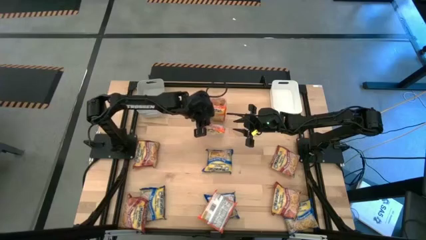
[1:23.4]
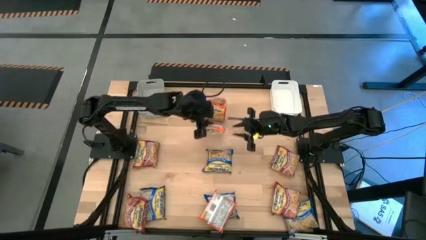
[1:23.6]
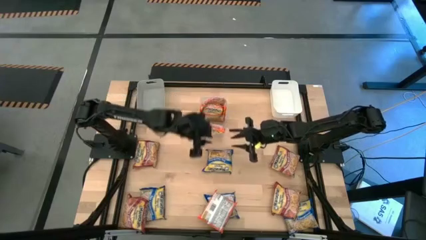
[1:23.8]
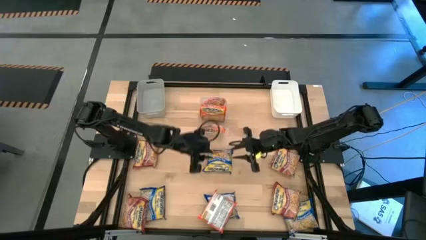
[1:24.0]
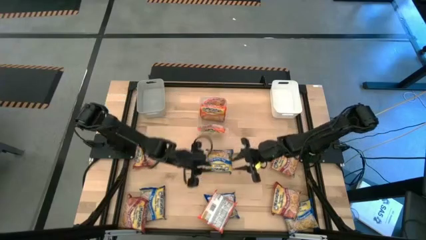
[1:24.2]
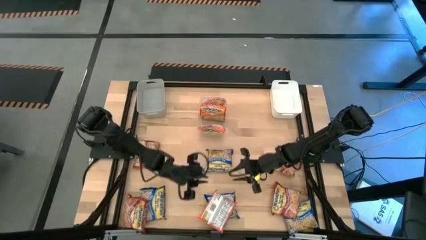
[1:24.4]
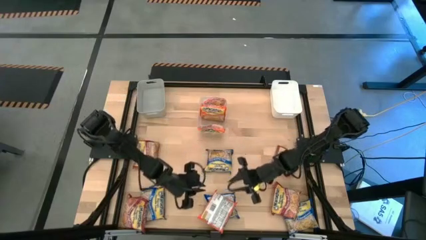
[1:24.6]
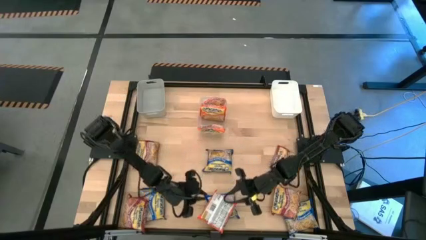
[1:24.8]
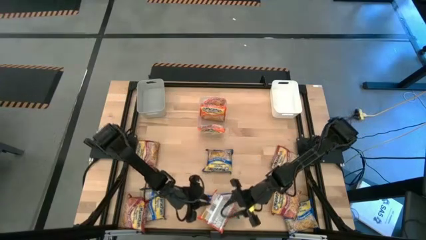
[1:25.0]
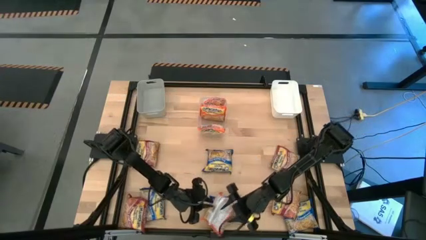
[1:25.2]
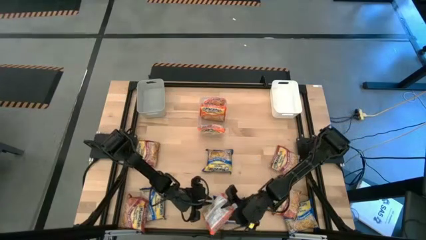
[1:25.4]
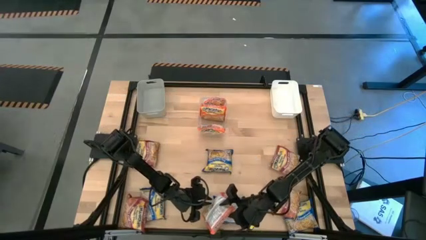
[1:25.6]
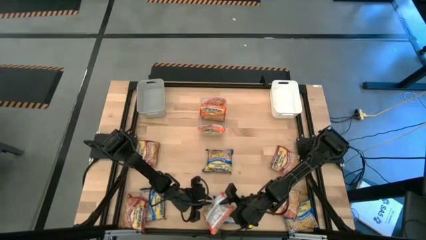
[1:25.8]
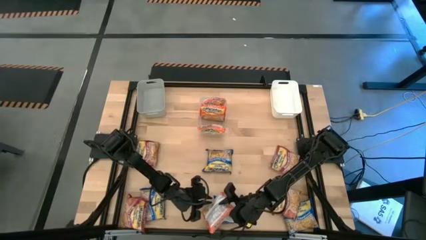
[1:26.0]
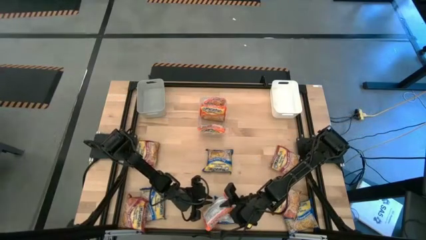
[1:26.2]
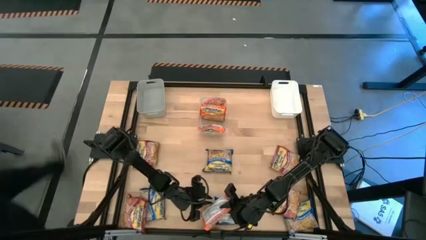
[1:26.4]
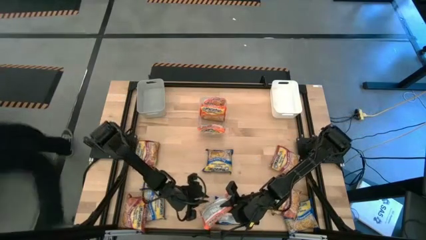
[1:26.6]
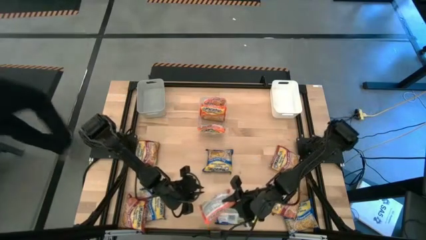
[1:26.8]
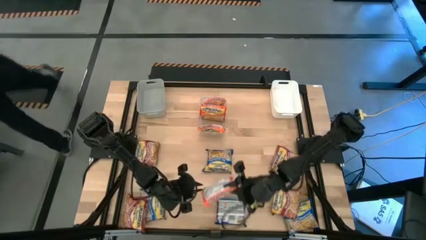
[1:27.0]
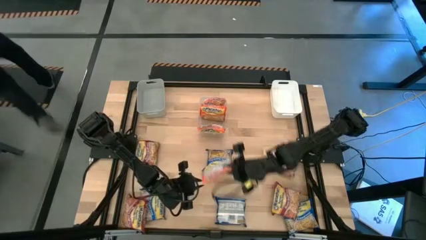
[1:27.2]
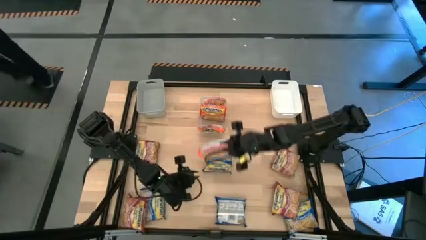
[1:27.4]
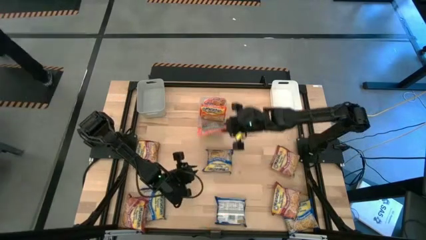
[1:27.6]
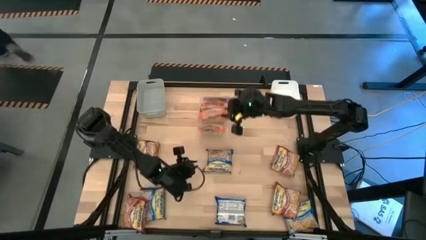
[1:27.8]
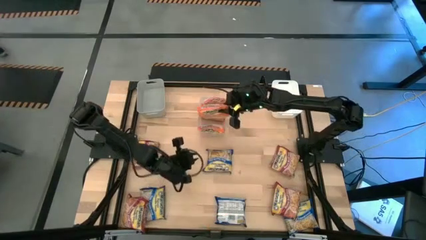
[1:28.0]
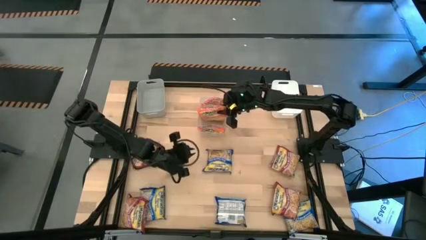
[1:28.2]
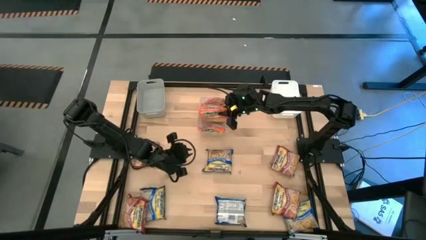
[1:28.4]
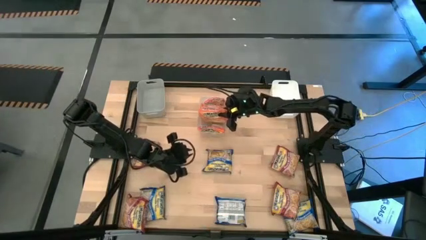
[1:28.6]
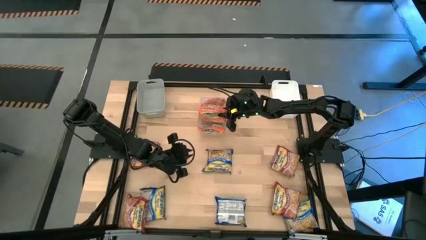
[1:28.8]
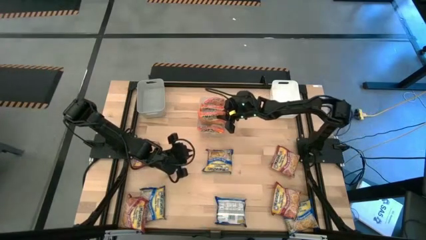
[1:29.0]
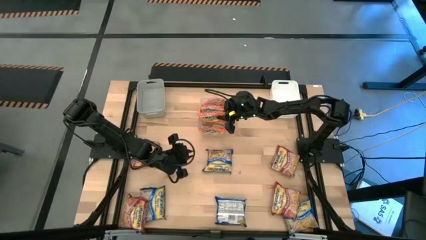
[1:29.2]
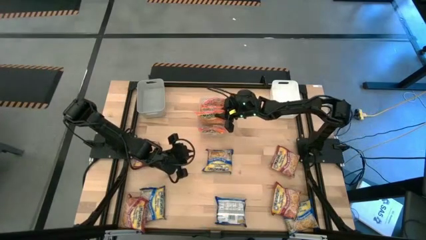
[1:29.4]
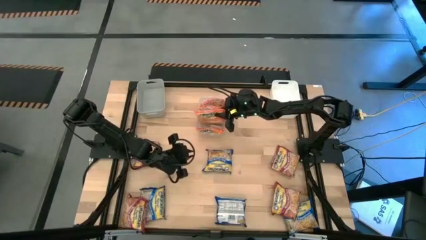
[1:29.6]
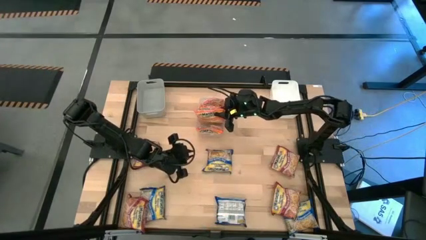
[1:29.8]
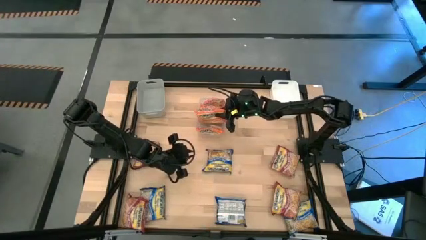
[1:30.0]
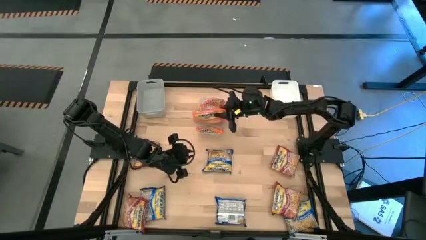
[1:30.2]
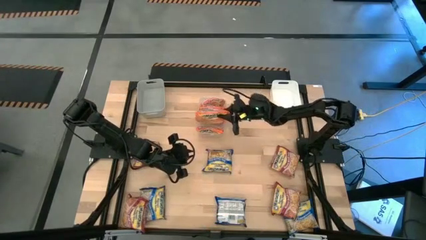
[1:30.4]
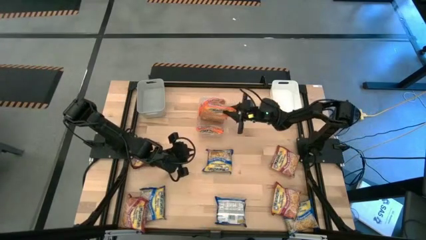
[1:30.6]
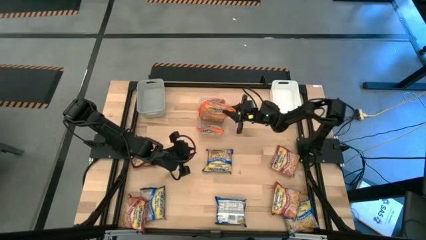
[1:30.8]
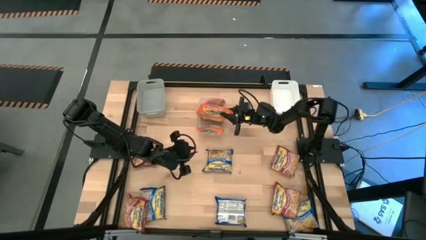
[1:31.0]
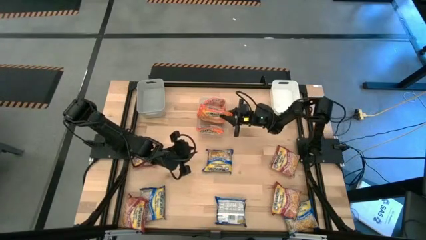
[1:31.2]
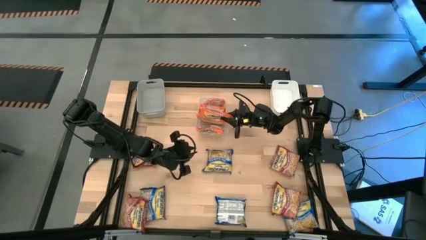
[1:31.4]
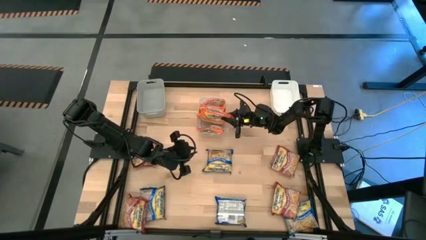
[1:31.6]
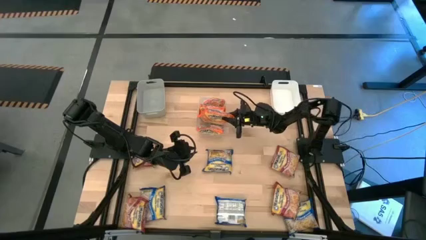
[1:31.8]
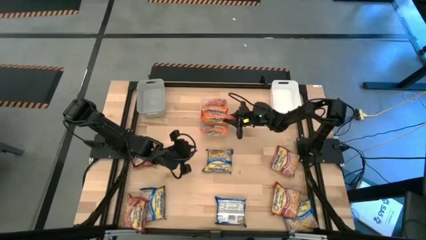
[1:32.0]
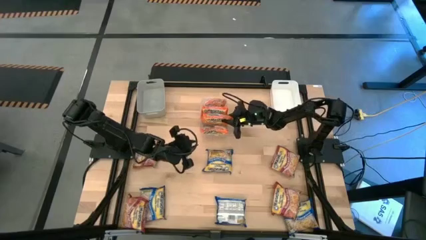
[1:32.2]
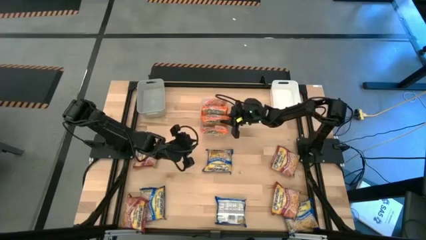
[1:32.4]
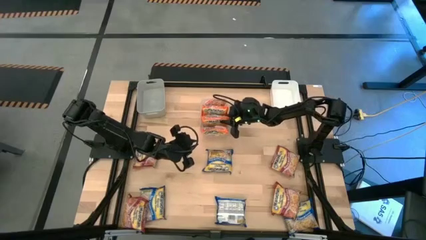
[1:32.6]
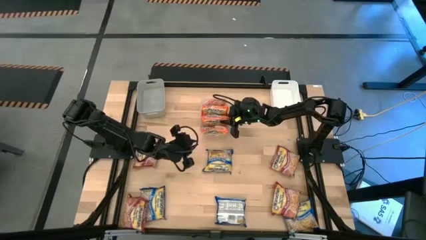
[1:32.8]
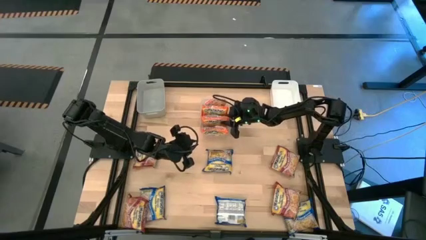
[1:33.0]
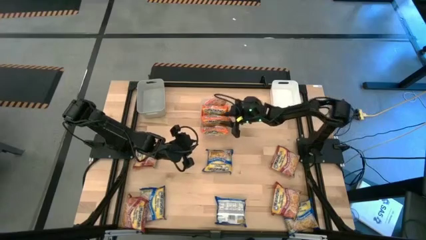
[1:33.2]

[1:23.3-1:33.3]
Task: Sort Maruchan noodles
Put the orange noodle into the transparent bin

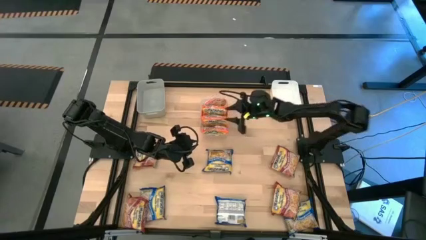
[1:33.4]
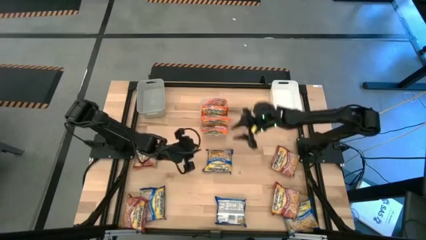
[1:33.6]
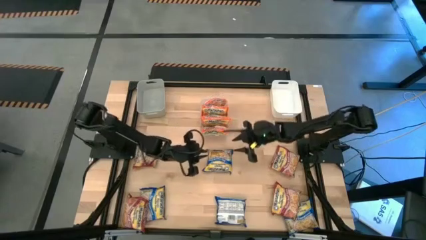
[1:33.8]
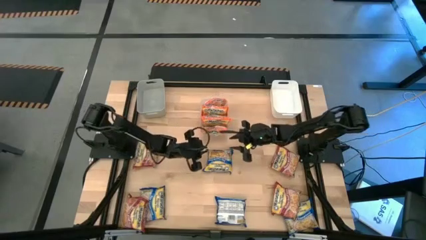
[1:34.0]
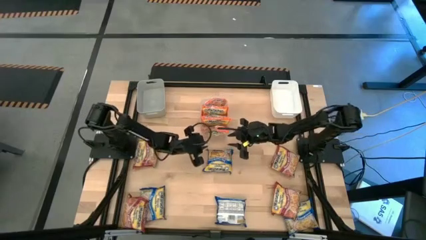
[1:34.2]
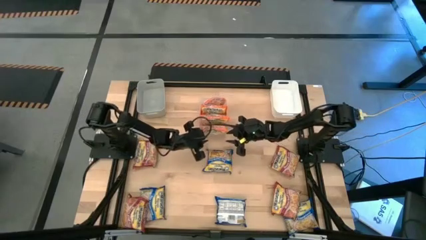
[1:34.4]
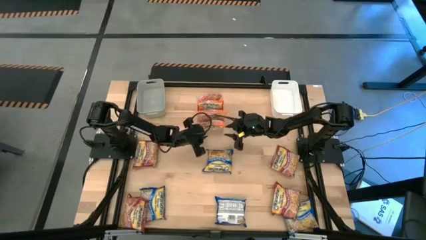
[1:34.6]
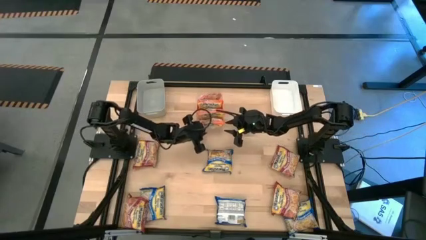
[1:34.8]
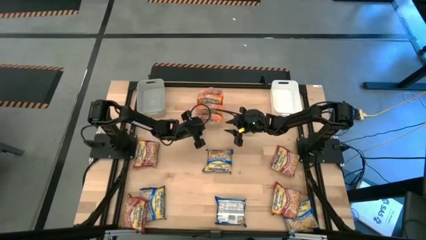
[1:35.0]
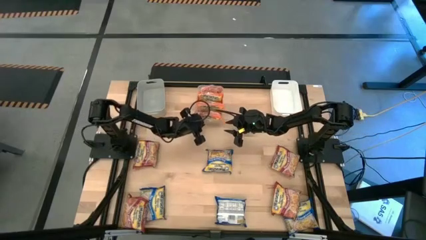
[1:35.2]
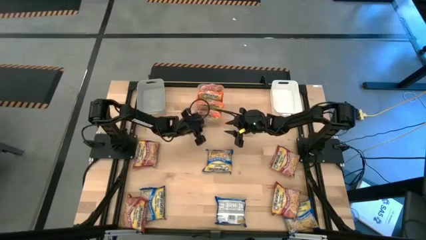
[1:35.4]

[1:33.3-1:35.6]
Adjust the transparent bin on the table

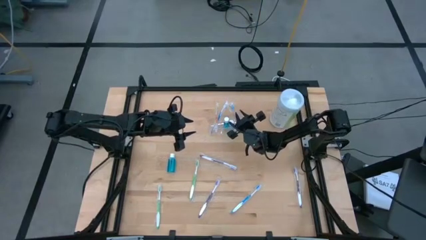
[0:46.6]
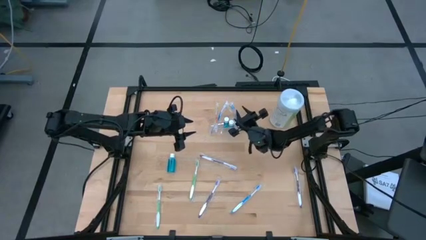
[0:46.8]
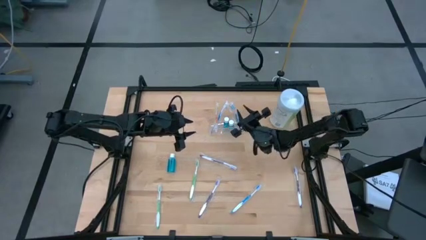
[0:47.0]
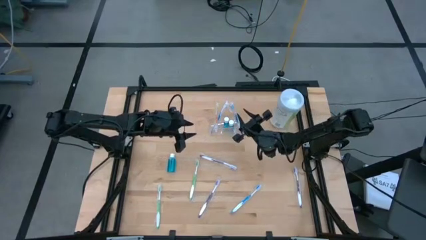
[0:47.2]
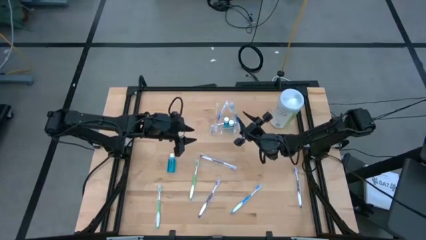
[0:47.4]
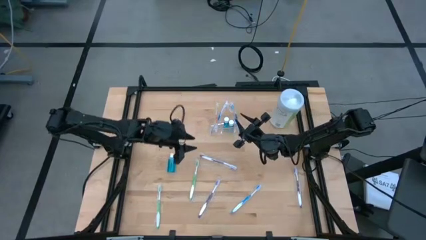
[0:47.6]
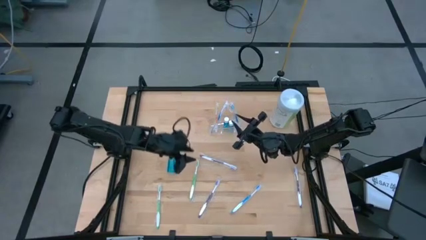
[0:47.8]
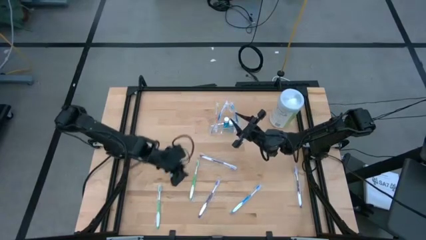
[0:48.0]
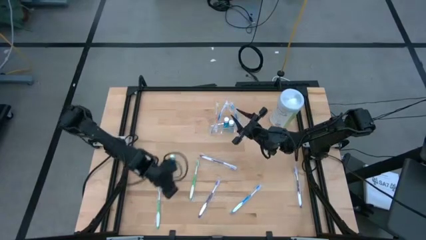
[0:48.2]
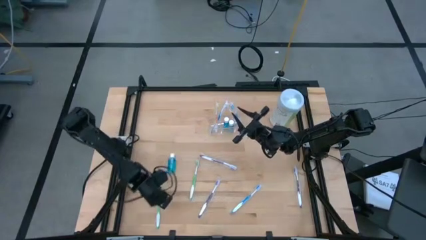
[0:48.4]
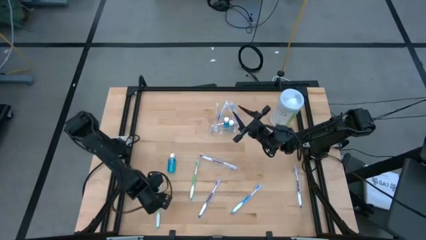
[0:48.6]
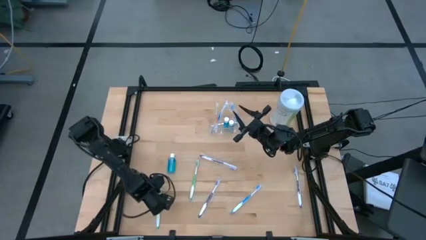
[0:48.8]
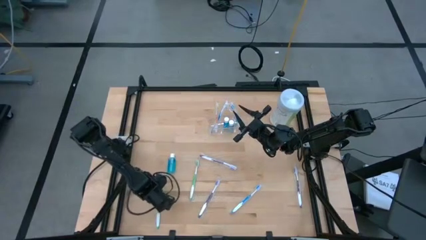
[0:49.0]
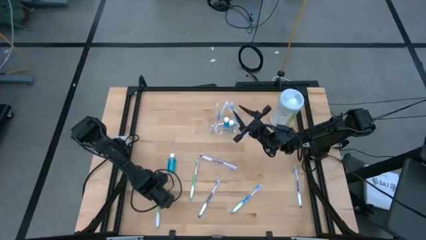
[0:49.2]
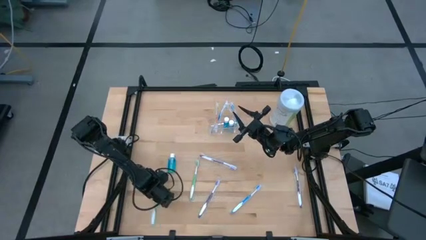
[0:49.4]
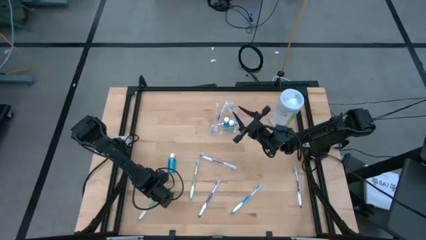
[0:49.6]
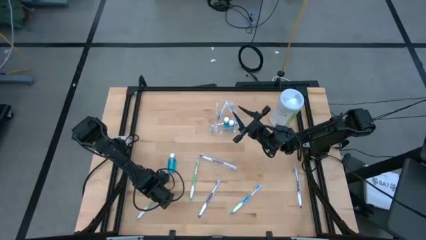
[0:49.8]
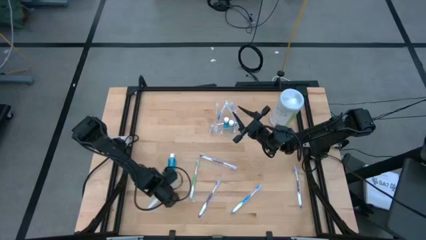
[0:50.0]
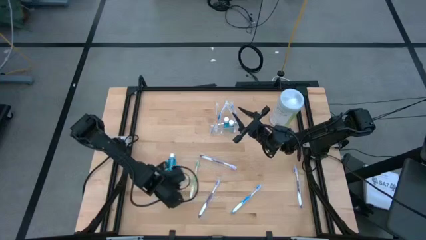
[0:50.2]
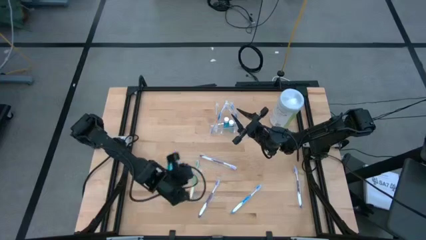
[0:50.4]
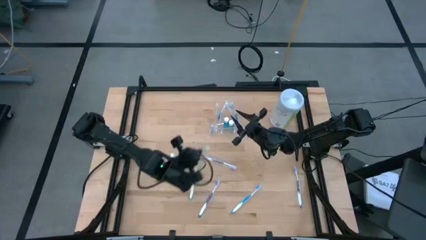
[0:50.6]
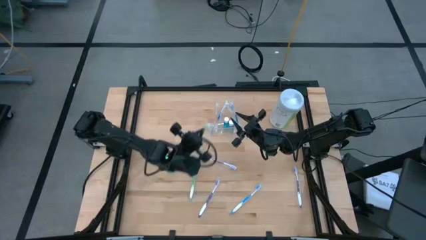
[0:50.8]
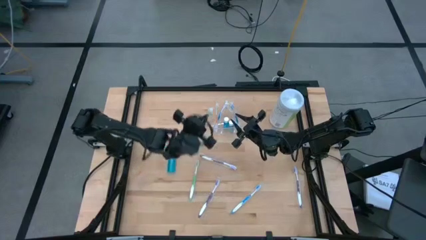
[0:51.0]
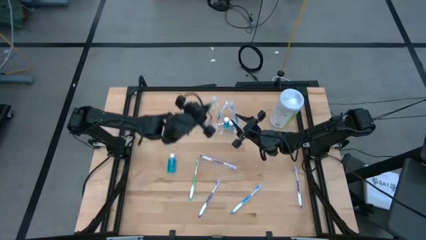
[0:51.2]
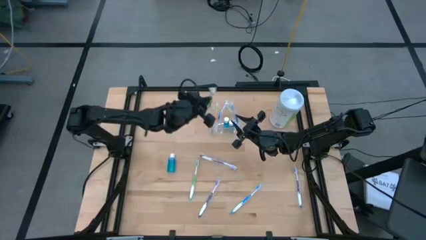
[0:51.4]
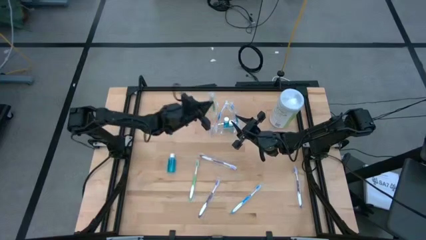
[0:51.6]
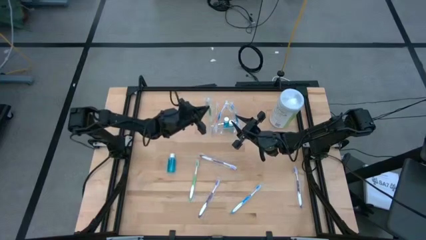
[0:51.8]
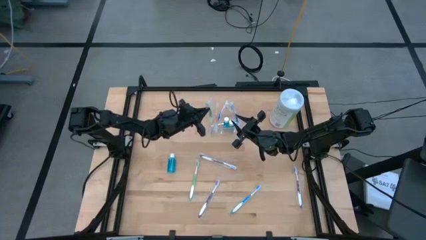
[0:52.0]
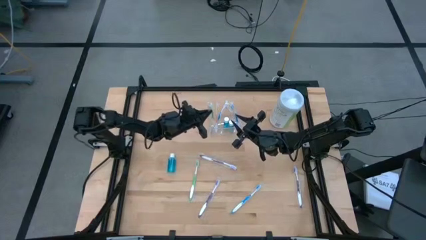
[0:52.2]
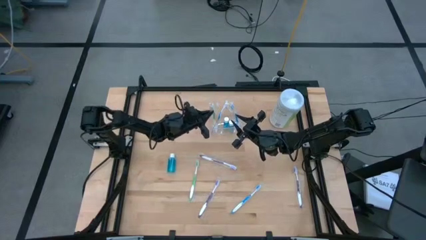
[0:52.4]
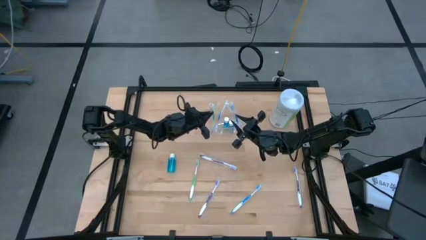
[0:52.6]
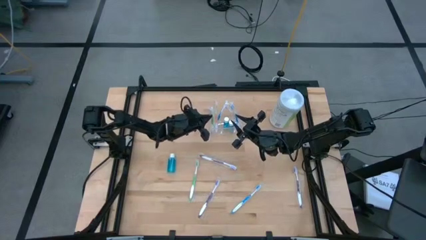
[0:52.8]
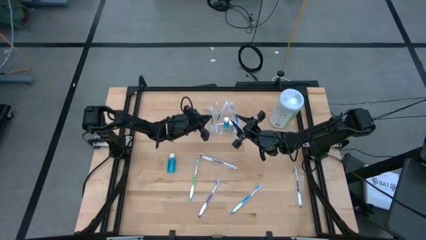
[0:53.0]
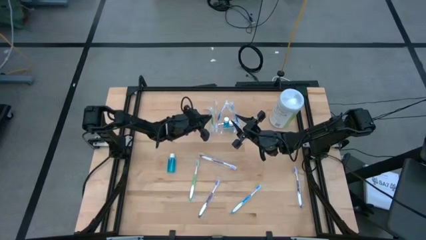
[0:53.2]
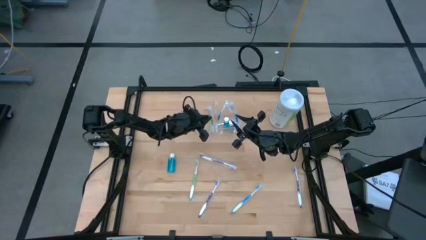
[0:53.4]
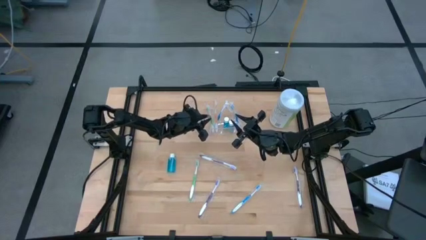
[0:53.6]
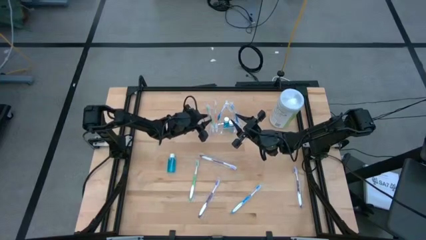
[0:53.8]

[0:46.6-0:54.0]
Task: Pick & Place toothbrushing station
Put the bottom green toothbrush into the transparent organizer
